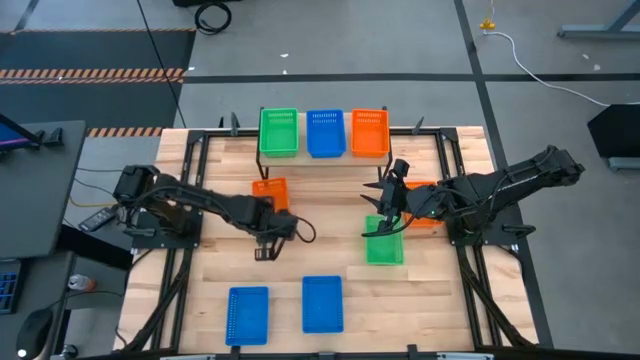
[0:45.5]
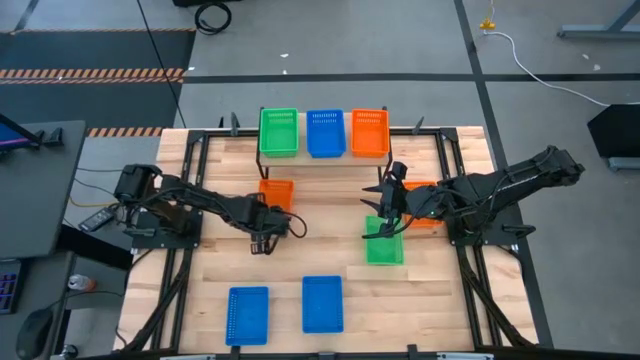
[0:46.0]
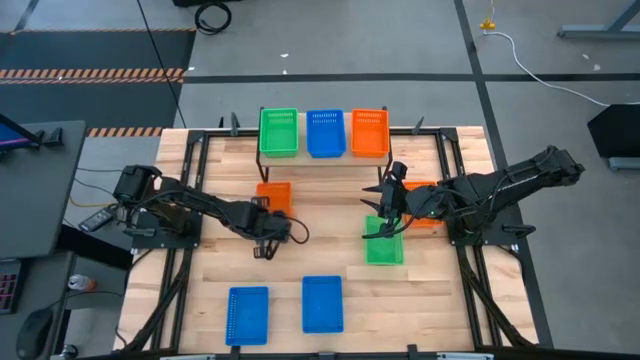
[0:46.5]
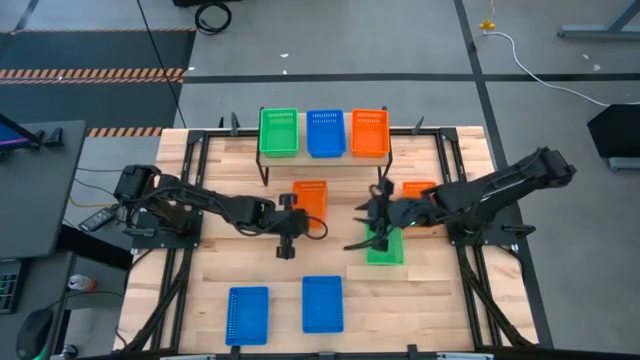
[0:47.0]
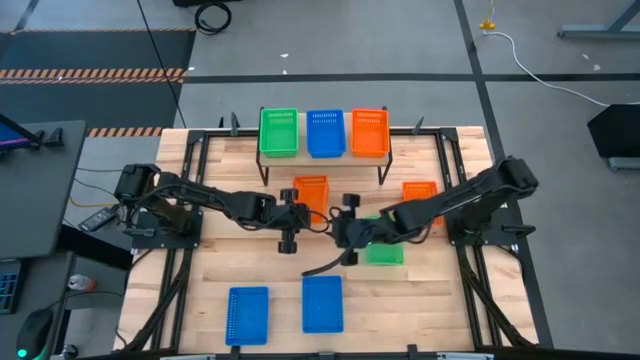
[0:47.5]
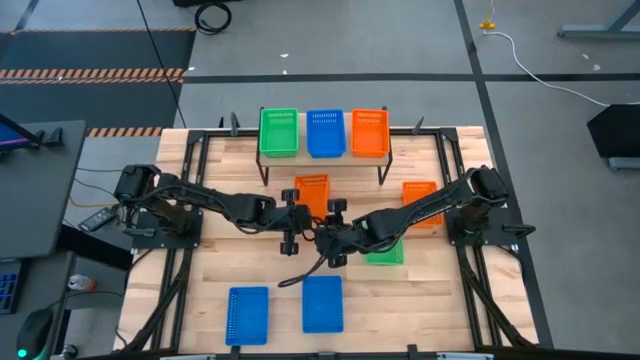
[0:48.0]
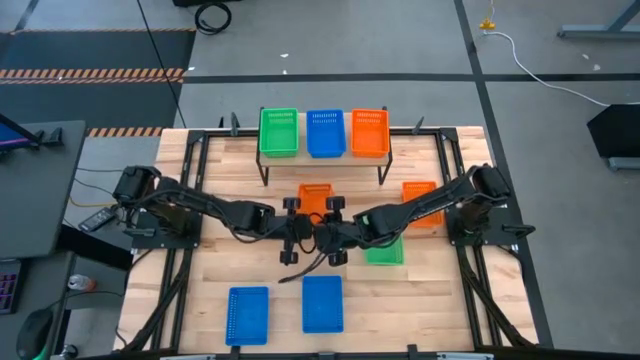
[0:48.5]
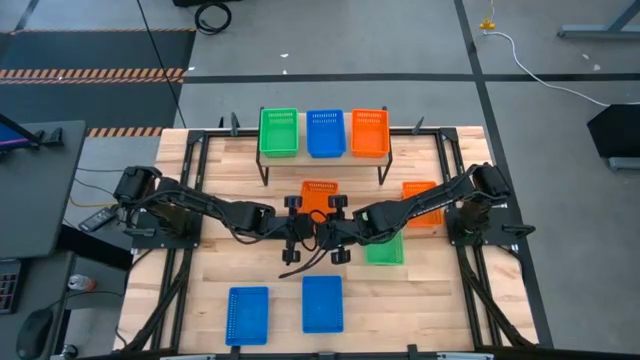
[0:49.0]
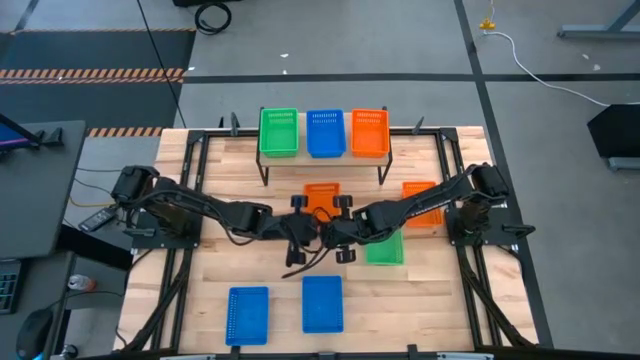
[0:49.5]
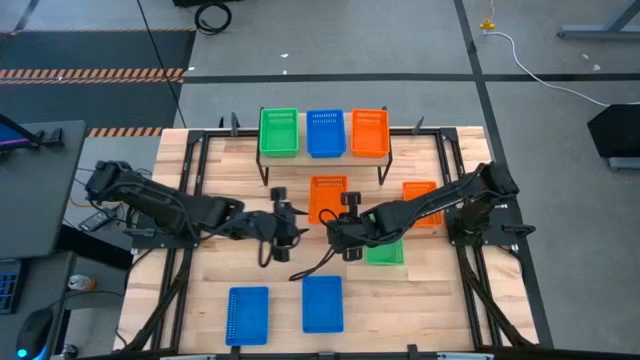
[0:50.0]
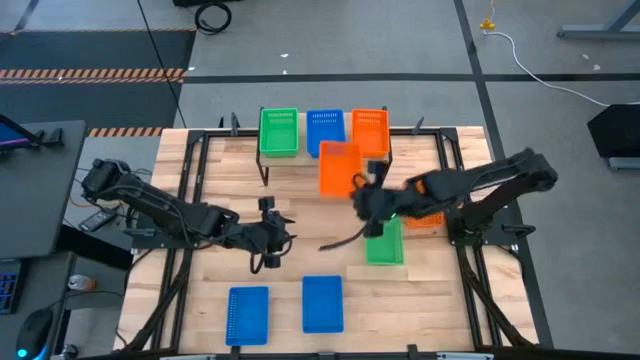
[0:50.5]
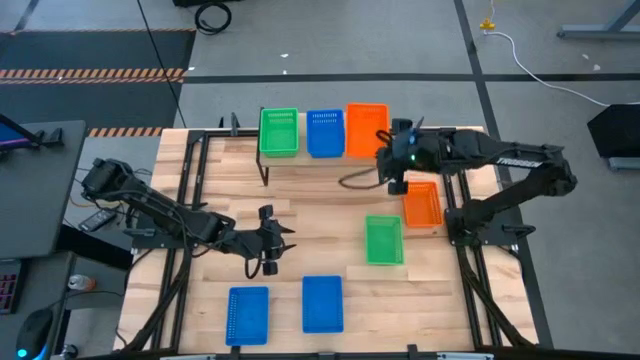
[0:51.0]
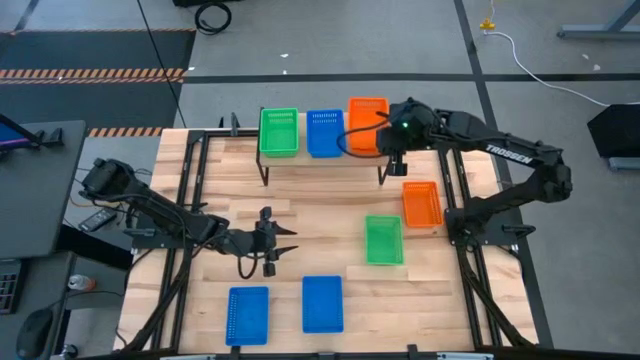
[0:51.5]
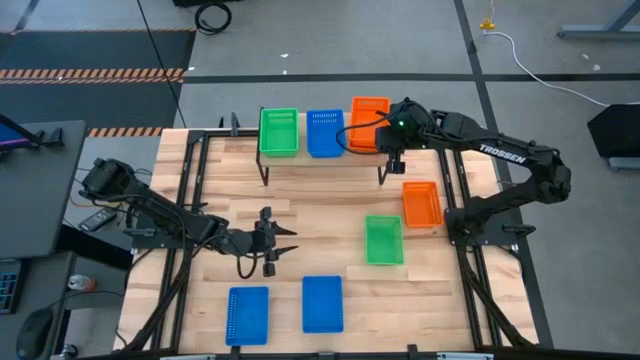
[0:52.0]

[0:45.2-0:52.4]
Task: Stack baskets on shelf by color
Stack the left orange bin on the orange bin on the shelf

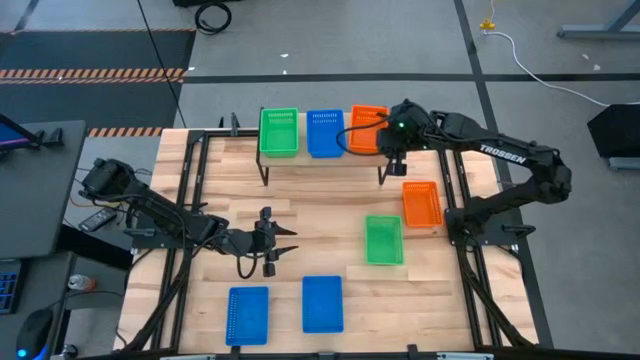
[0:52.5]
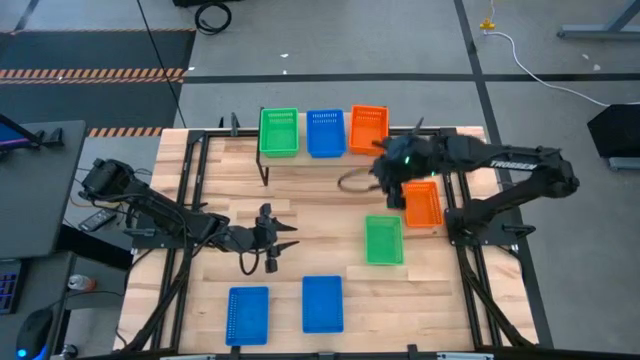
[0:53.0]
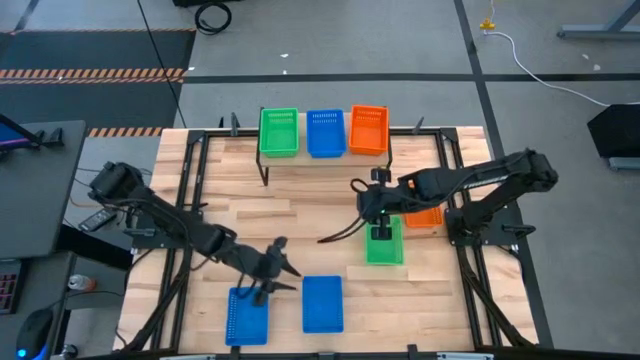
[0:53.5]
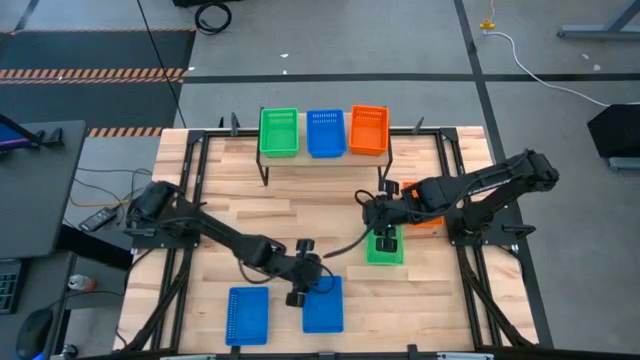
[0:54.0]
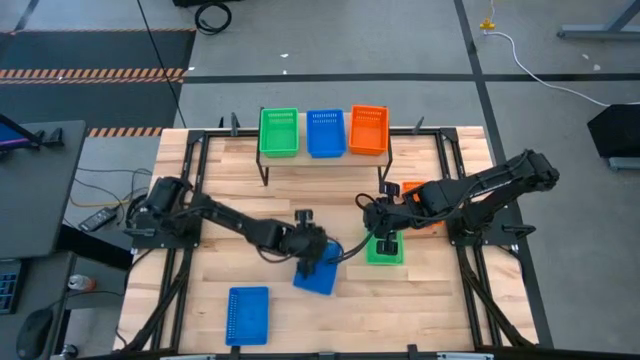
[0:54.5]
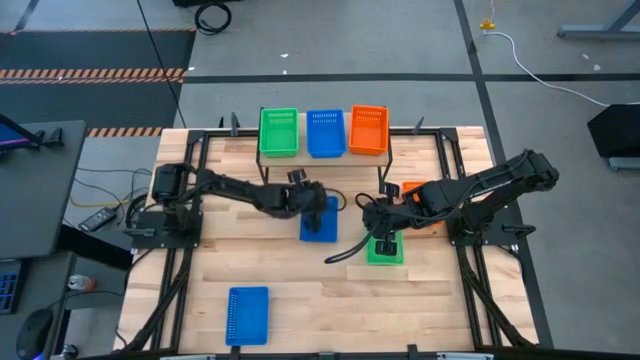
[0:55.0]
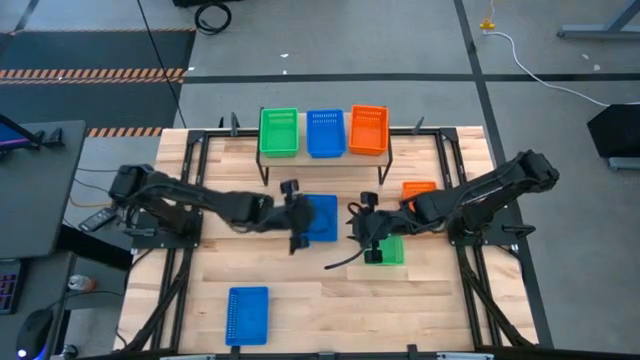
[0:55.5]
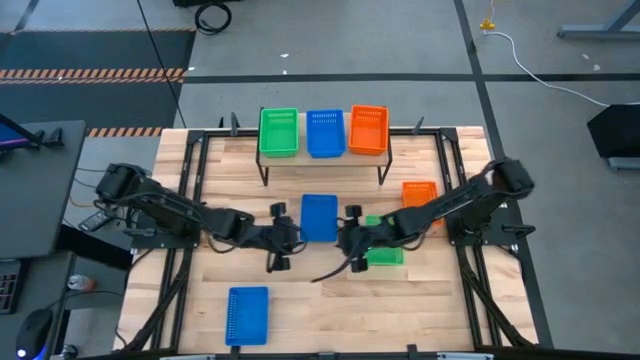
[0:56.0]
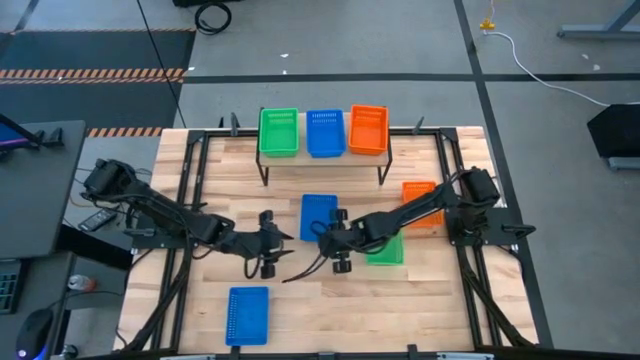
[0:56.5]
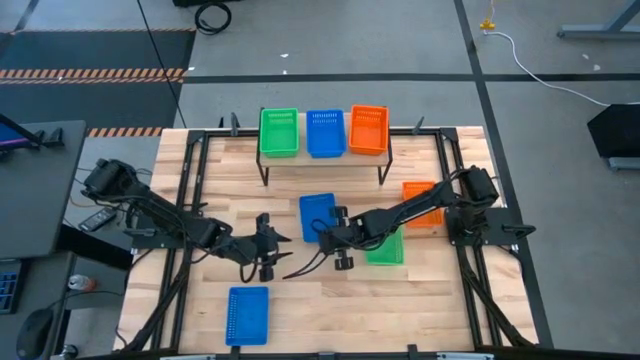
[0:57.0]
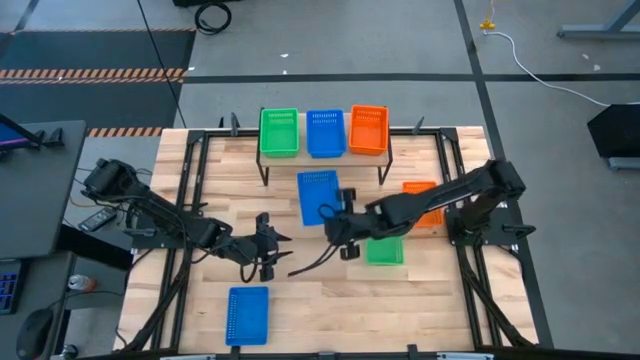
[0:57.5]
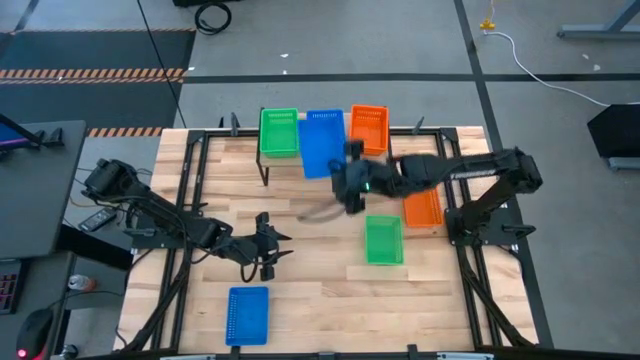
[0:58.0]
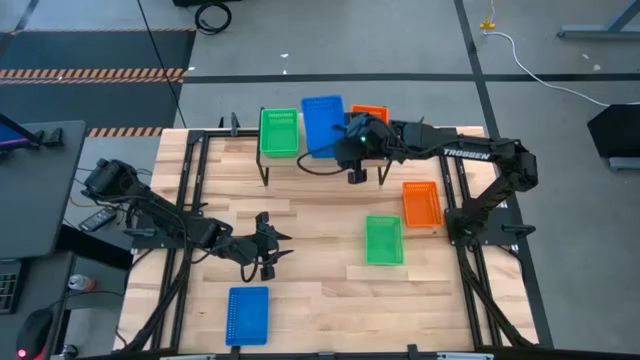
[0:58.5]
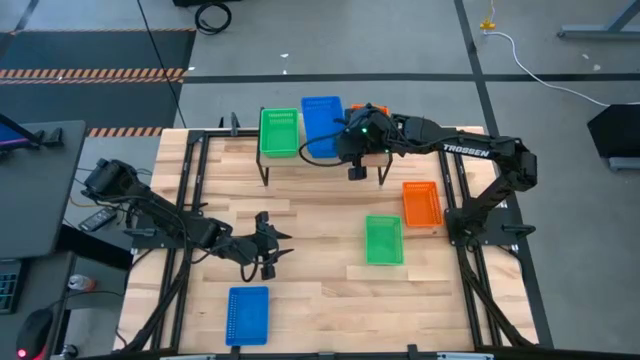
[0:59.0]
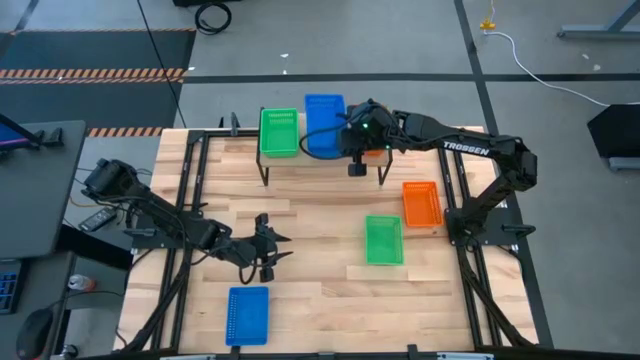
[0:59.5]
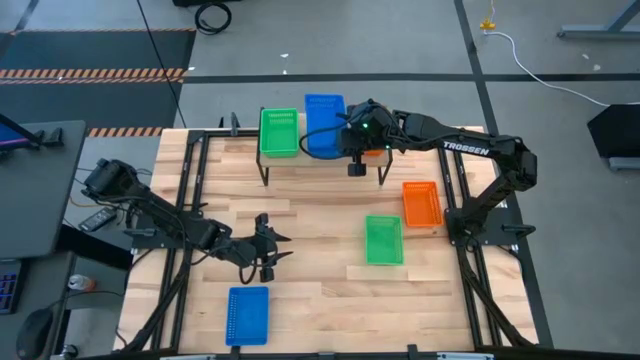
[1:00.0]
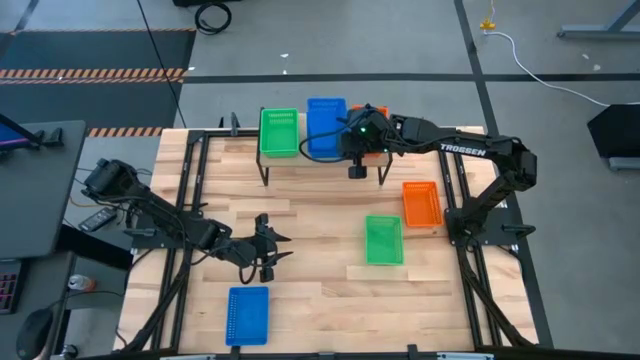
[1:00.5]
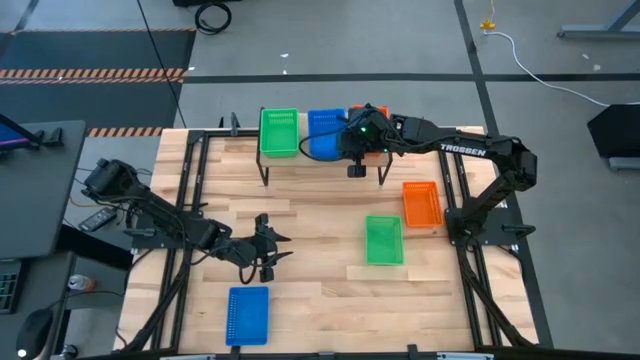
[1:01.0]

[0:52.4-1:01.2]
Stack the right blue bin on the blue bin on the shelf

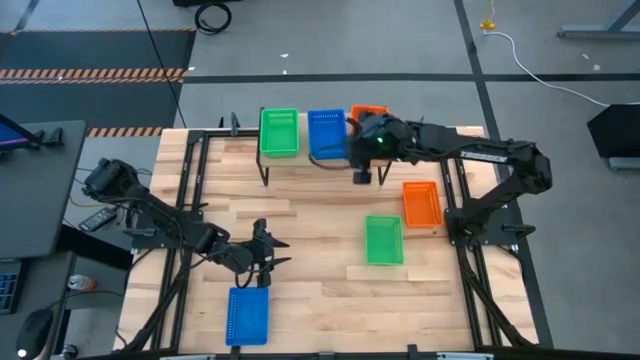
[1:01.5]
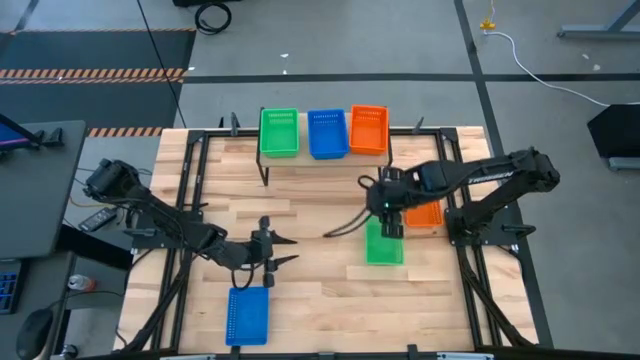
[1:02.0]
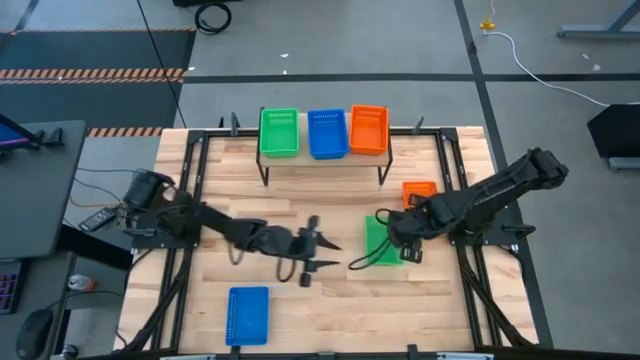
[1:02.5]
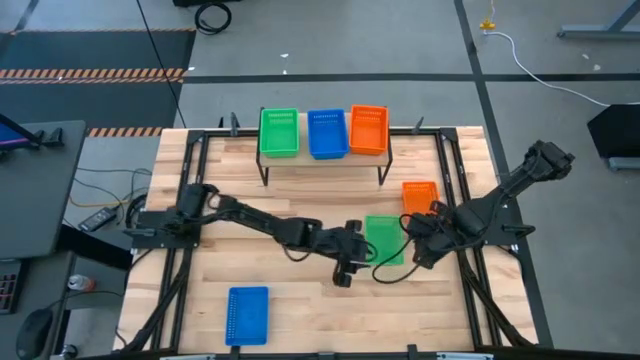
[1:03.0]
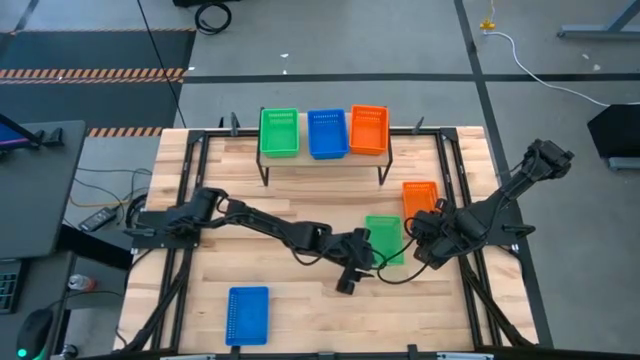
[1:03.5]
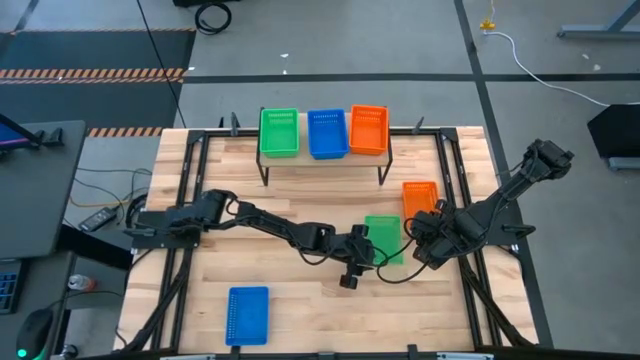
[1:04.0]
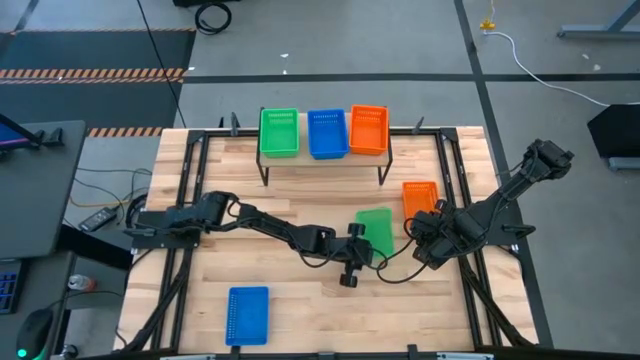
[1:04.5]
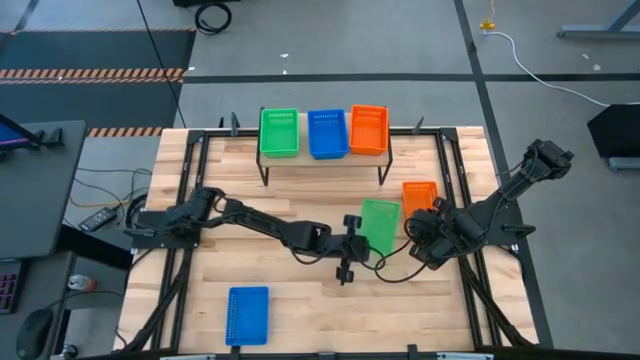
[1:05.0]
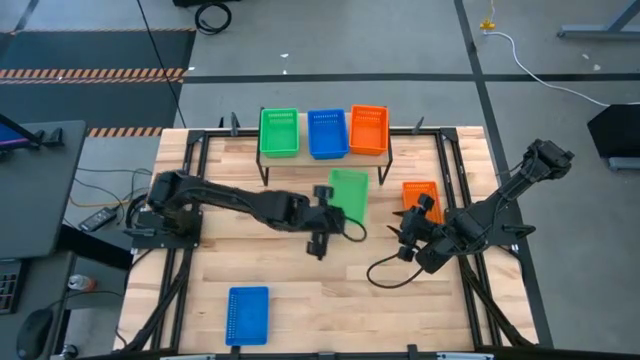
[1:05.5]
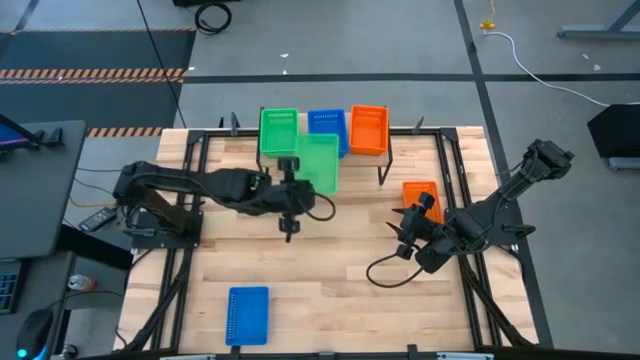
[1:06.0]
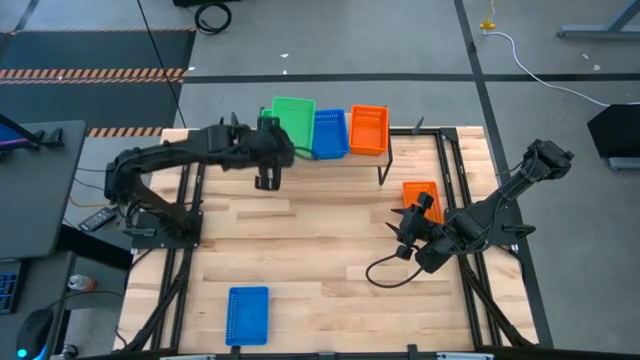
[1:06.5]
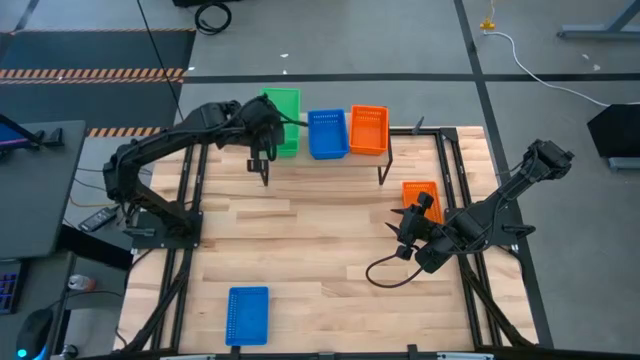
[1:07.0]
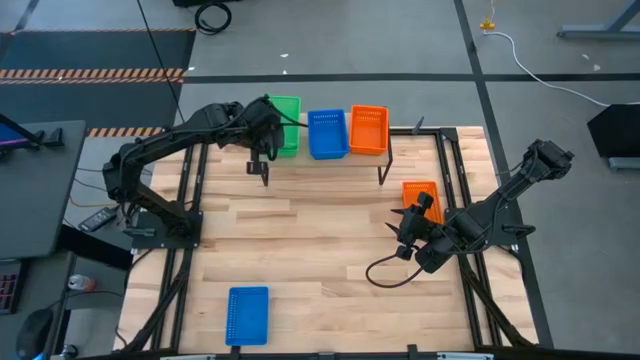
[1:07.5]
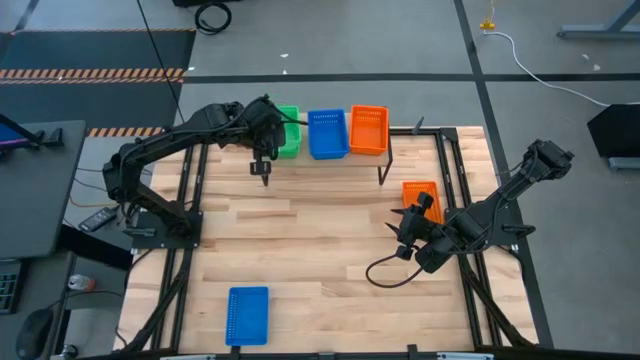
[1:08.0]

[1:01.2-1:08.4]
Stack the green bin on the green bin on the shelf
